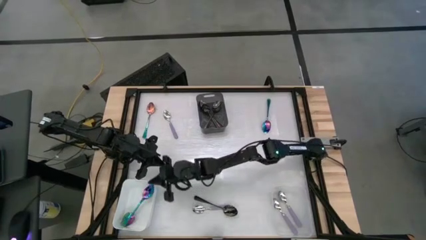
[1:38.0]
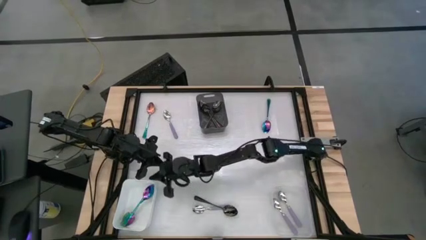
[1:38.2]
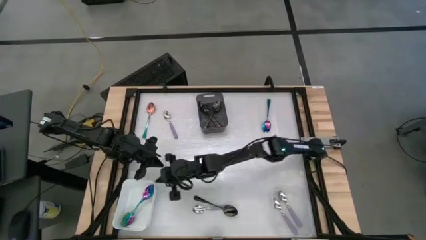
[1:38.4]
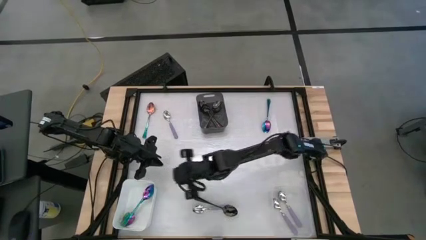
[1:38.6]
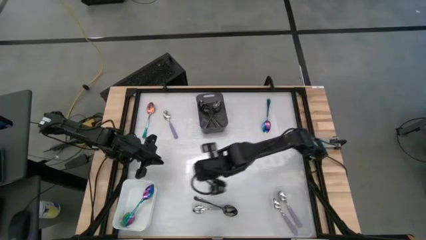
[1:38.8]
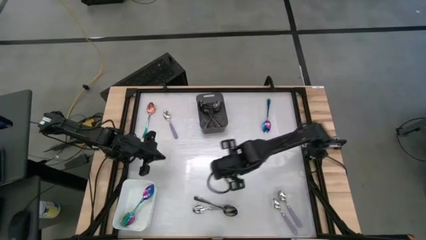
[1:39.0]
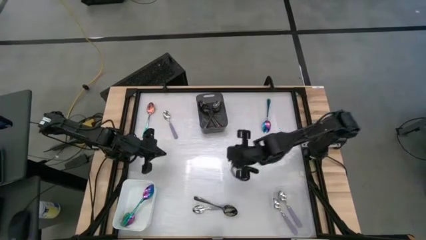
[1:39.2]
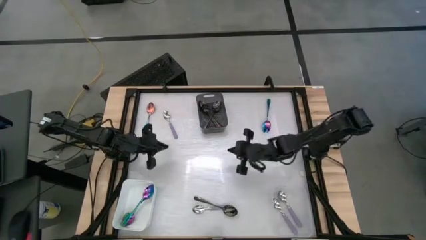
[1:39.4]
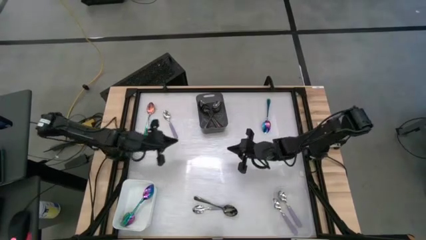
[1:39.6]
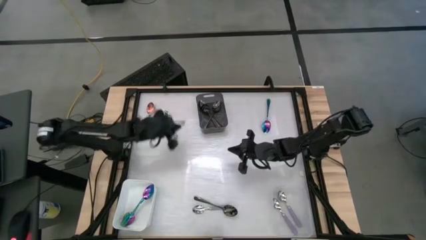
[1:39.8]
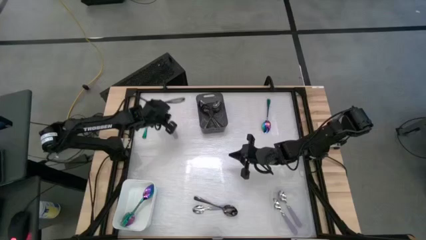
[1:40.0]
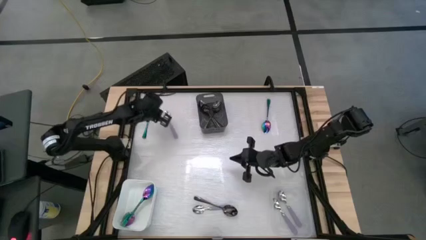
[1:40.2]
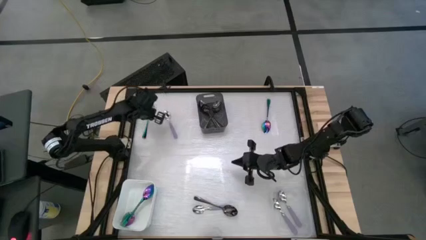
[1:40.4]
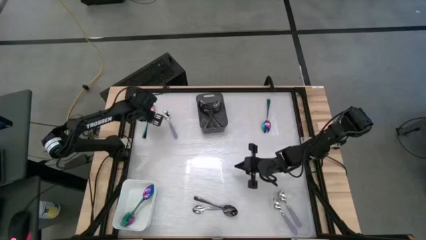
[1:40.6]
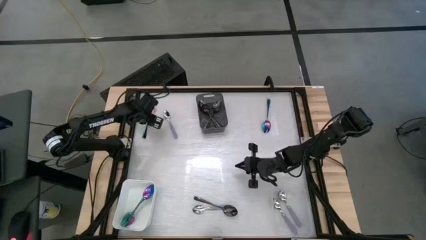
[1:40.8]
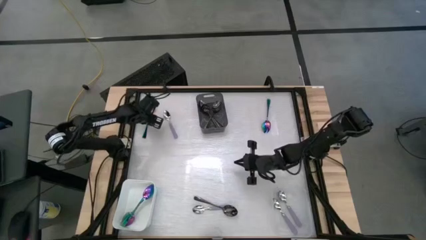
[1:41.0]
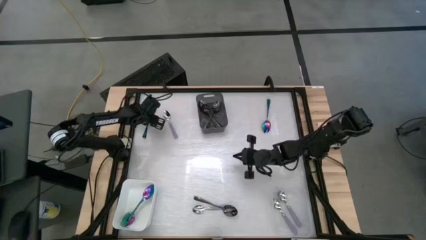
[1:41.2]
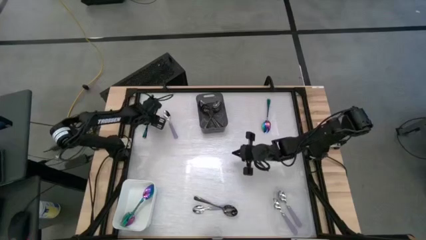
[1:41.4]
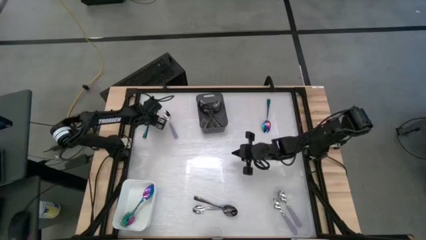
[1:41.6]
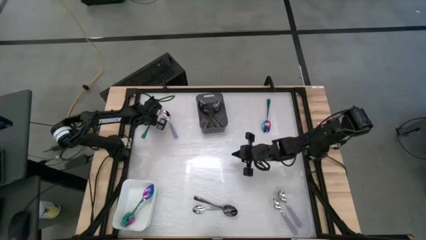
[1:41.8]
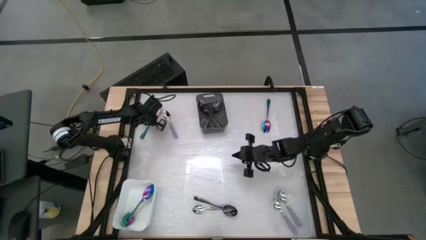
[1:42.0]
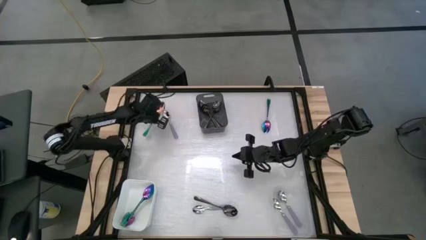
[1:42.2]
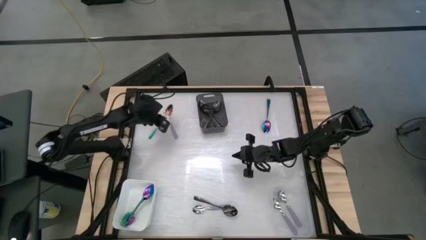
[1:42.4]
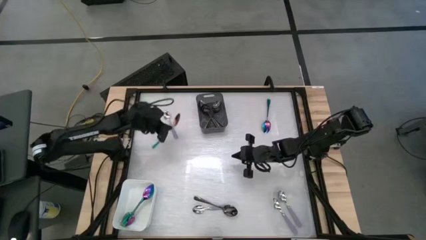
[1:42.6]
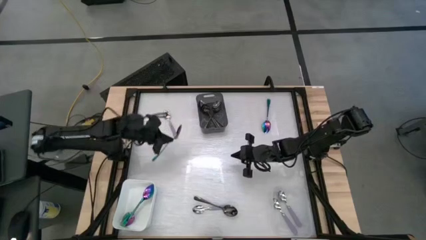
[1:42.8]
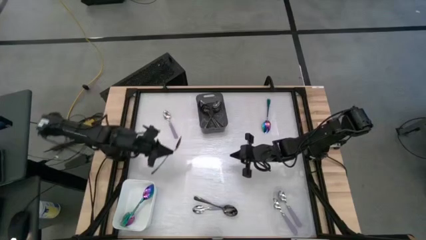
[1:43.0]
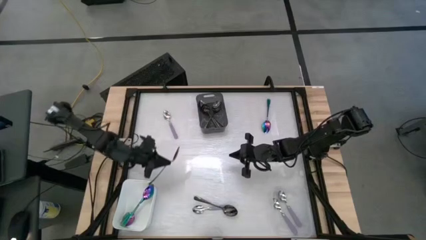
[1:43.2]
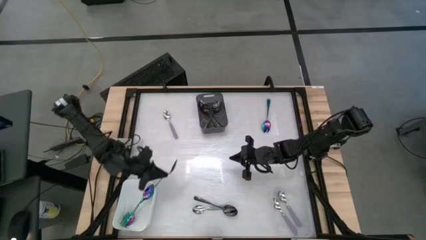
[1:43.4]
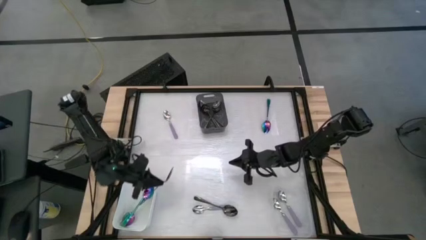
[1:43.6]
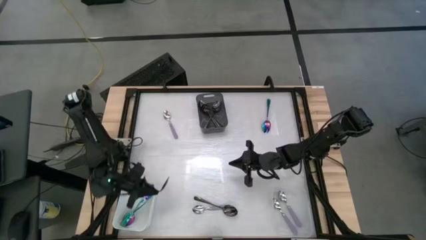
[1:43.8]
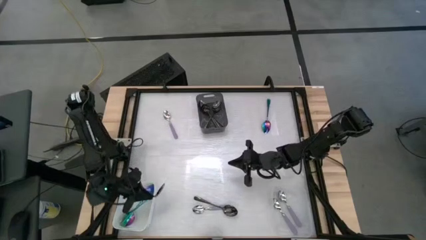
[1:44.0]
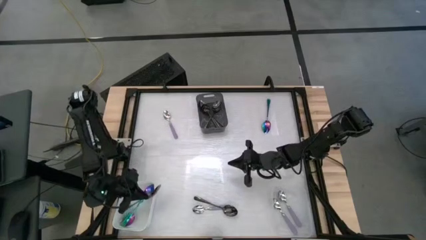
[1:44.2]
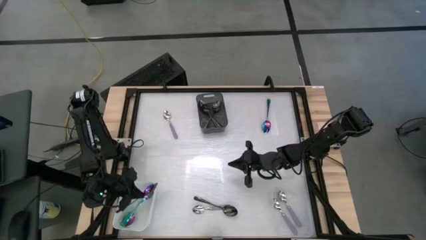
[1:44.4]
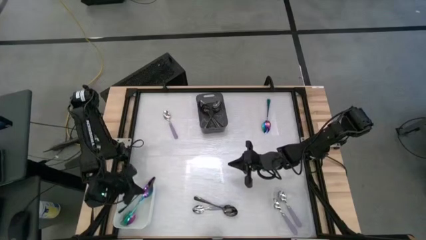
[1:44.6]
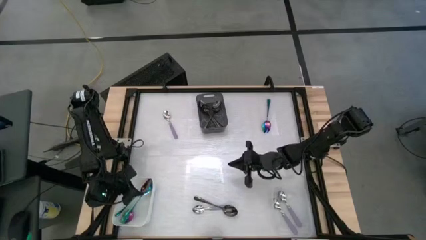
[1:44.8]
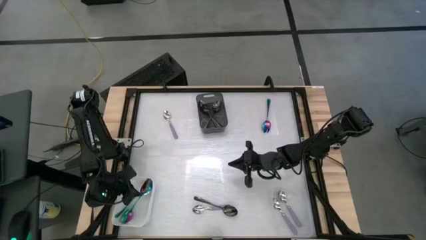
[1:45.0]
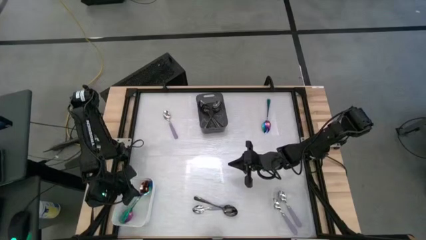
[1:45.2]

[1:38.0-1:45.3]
Task: Sort silverware by color (type)
Put the blue spoon into the white bin

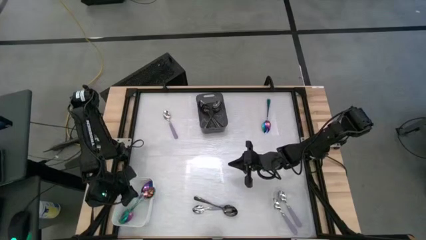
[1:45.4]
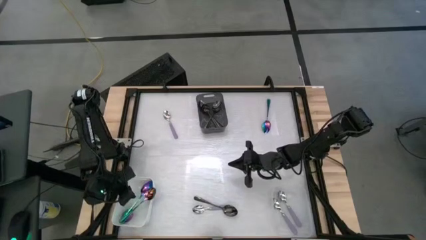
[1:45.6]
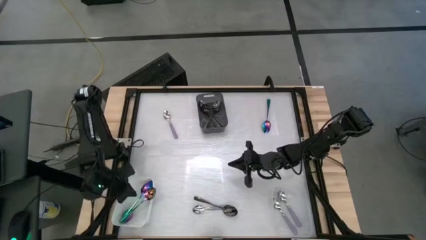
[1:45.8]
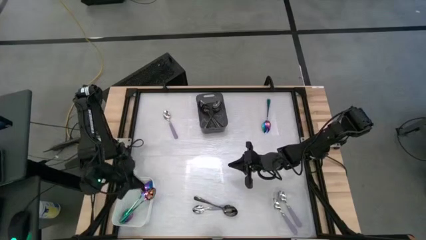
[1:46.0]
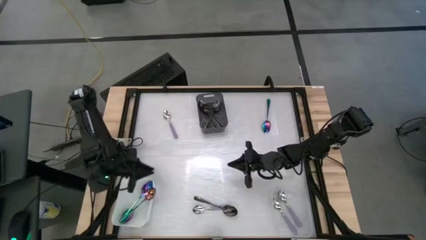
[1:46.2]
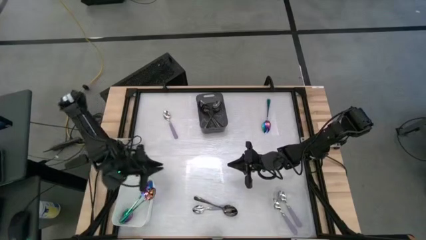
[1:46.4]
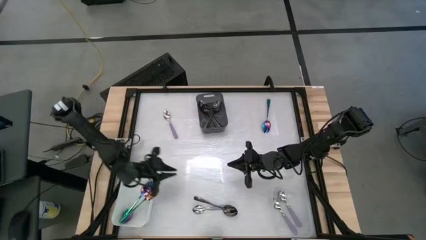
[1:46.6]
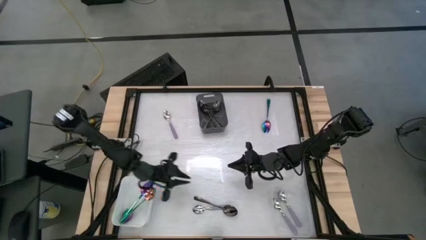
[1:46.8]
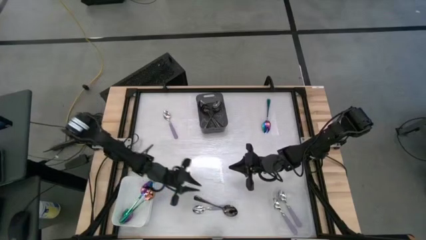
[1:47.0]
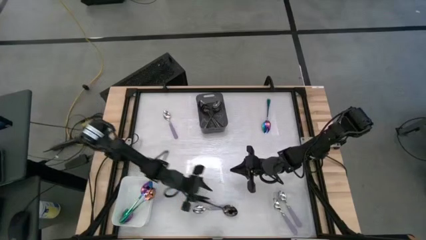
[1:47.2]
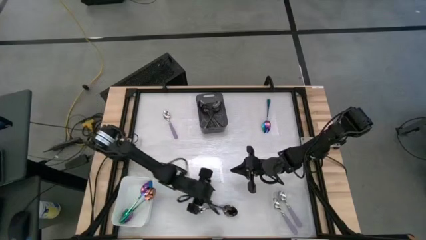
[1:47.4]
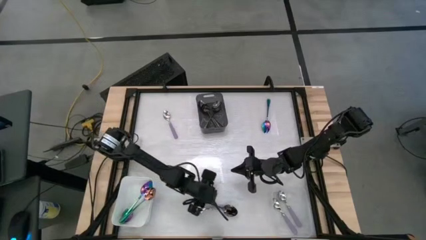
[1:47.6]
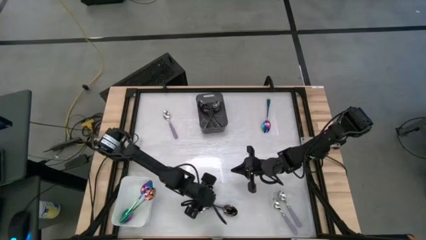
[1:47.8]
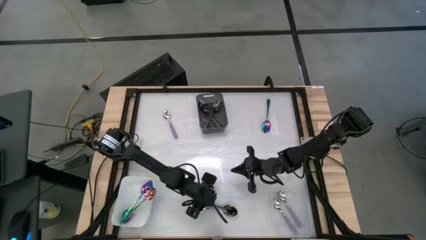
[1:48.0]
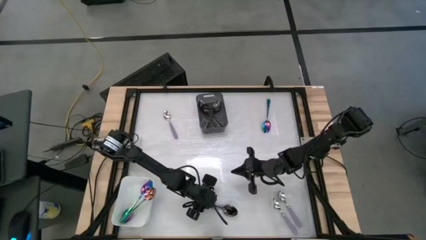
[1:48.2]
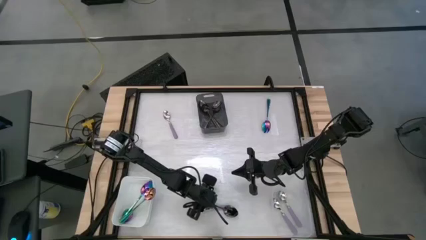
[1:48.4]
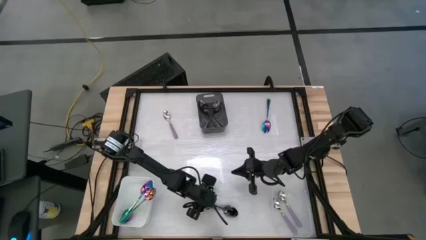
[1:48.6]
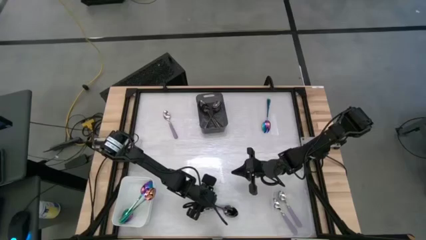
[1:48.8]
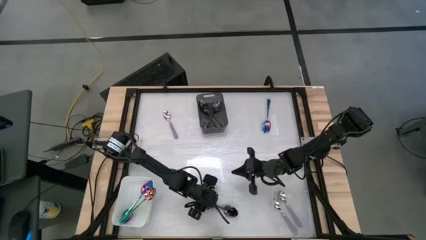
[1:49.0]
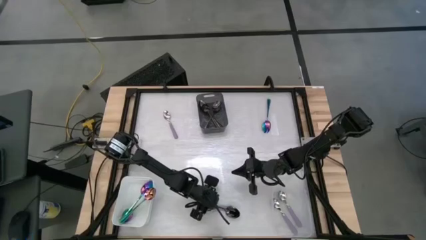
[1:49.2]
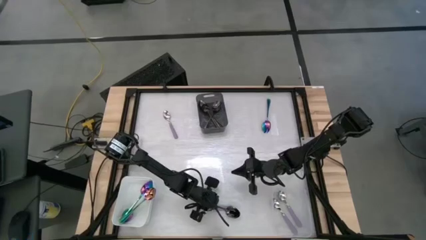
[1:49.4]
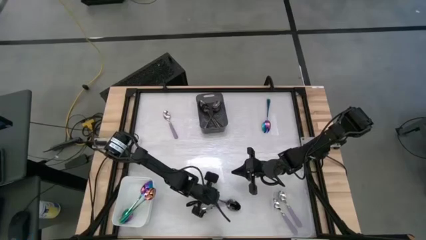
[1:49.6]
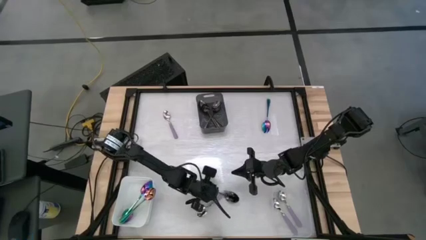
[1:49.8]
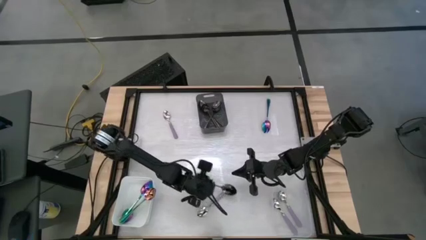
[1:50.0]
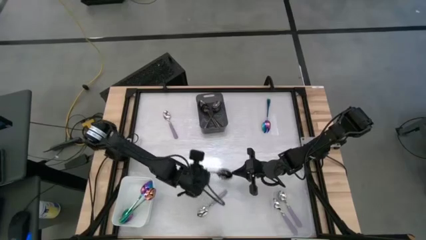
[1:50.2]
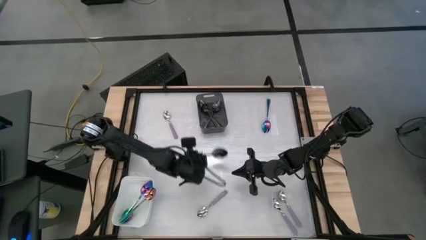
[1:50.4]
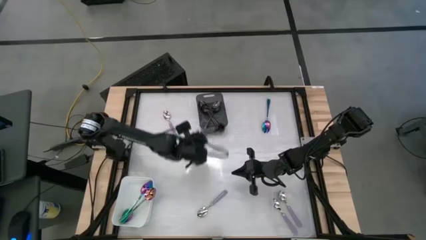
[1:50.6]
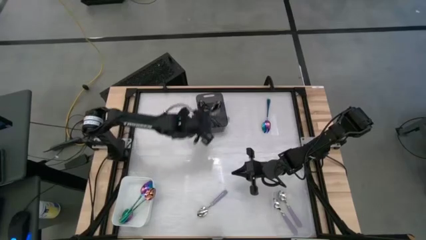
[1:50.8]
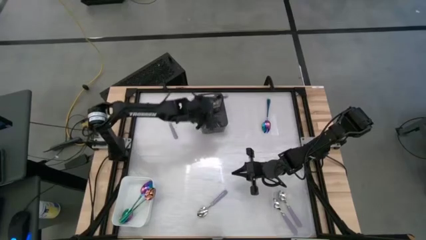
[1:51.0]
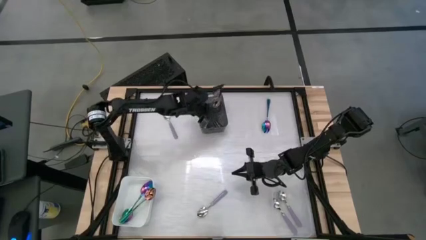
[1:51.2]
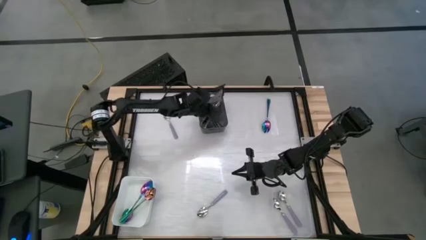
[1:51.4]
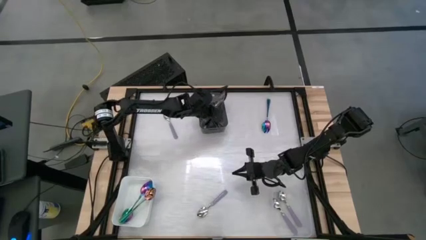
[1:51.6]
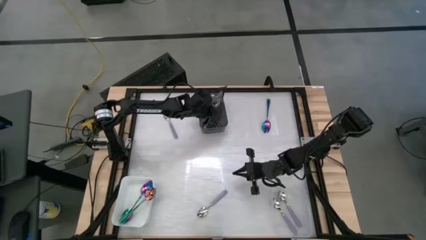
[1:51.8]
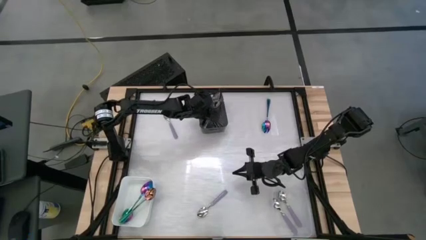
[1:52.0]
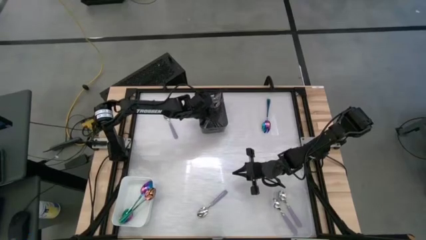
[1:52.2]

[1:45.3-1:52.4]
Put the black spoon into the black bin
